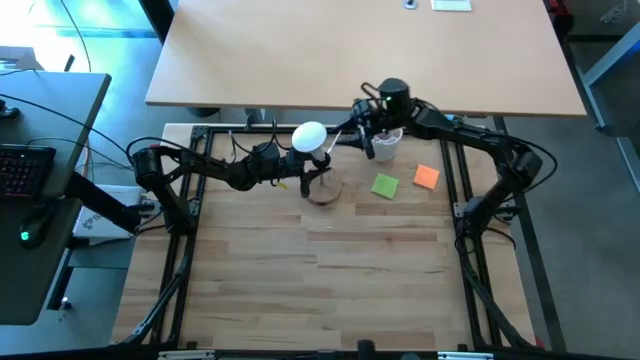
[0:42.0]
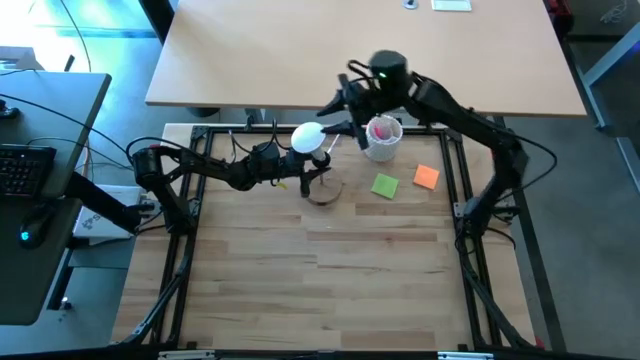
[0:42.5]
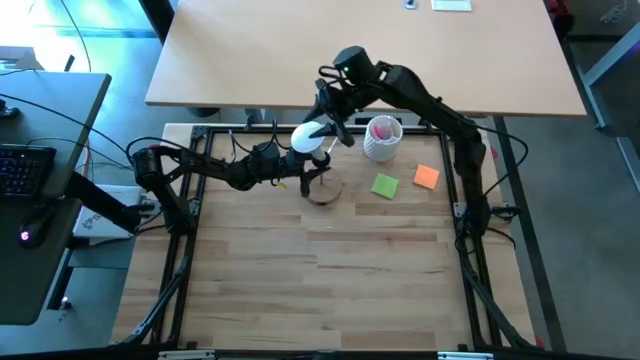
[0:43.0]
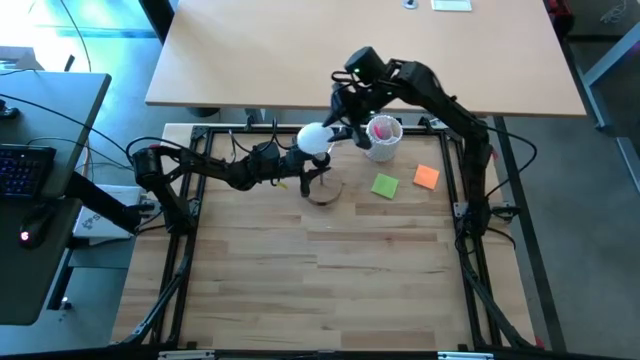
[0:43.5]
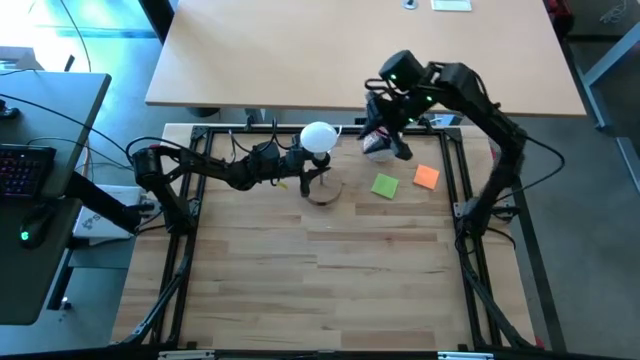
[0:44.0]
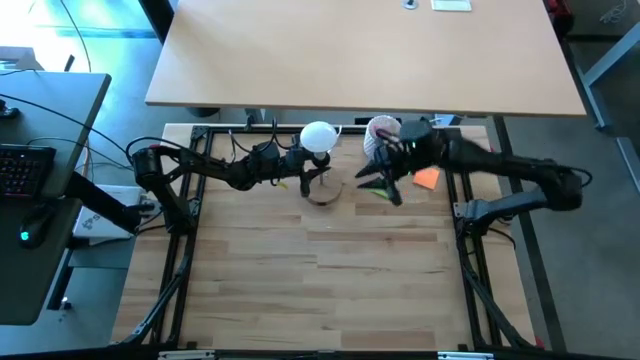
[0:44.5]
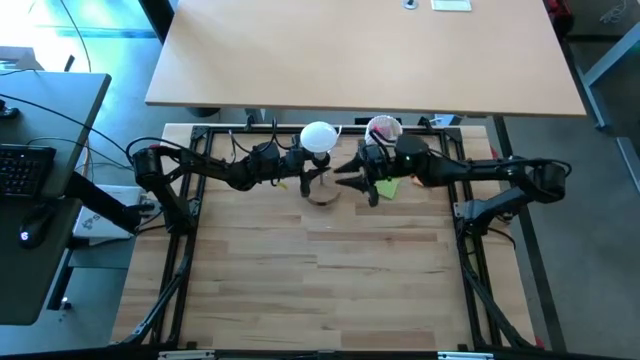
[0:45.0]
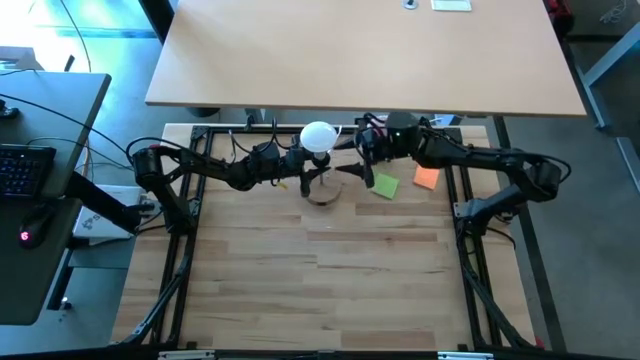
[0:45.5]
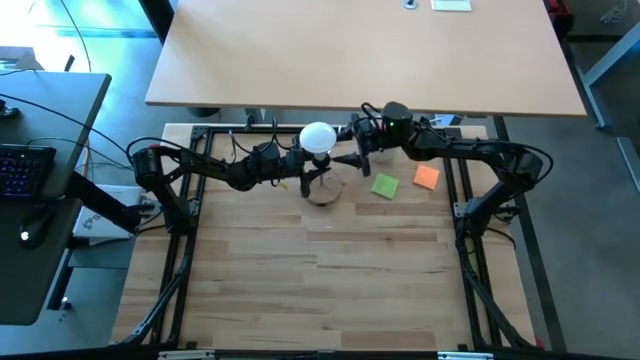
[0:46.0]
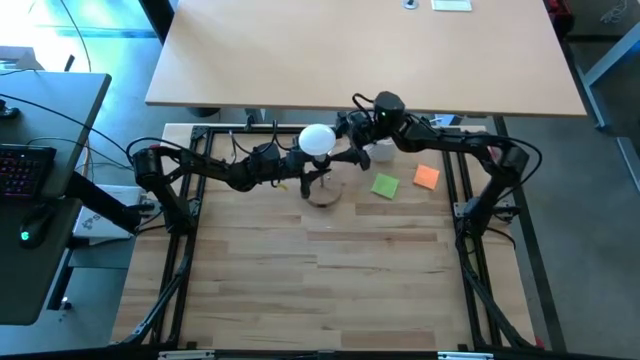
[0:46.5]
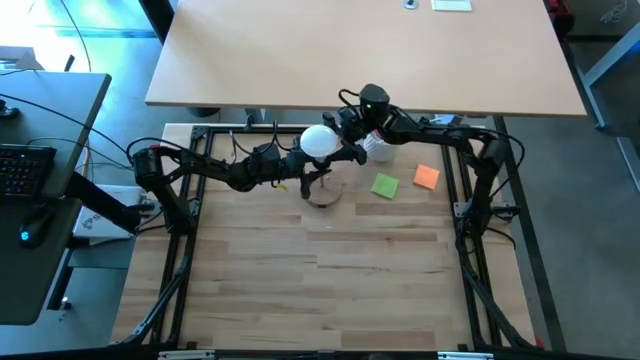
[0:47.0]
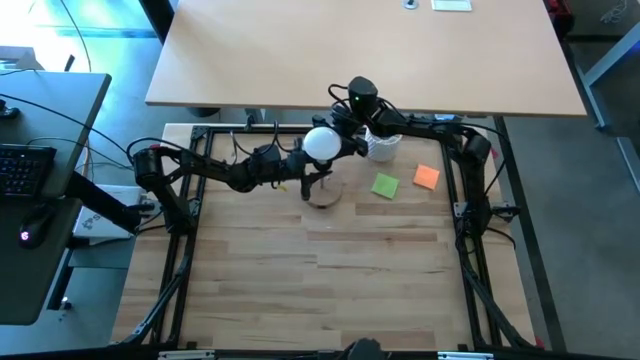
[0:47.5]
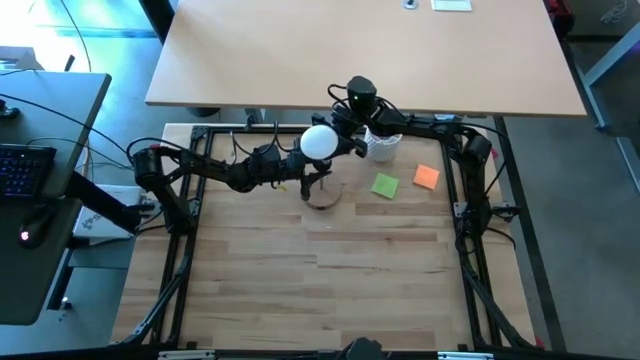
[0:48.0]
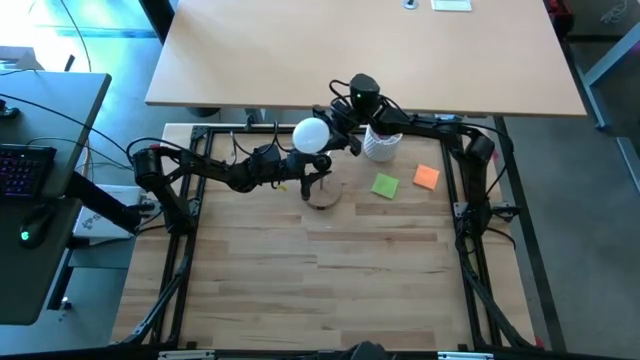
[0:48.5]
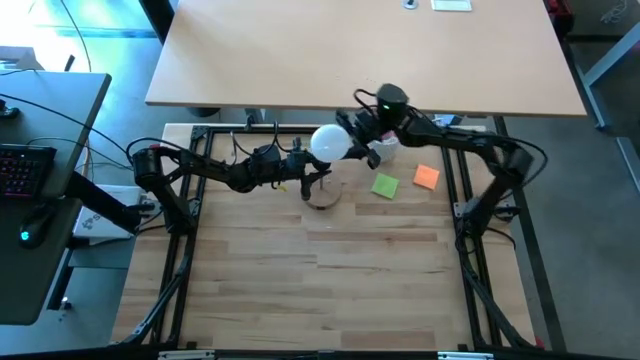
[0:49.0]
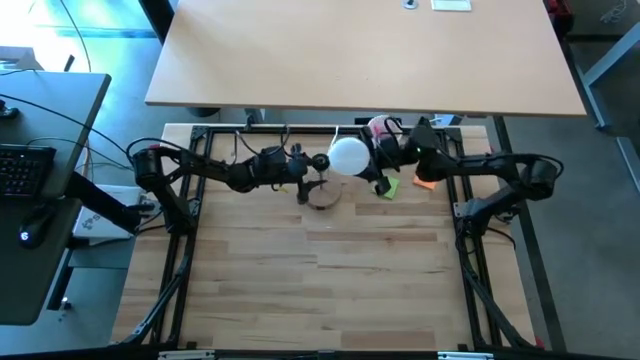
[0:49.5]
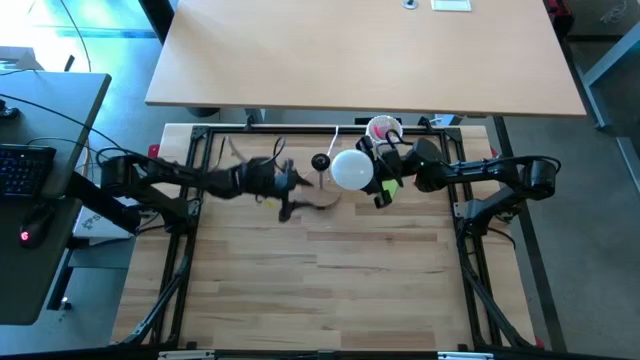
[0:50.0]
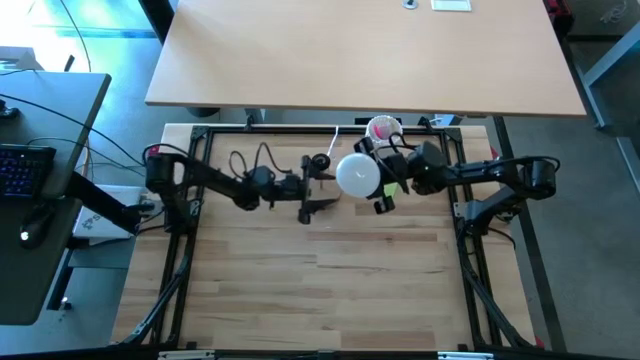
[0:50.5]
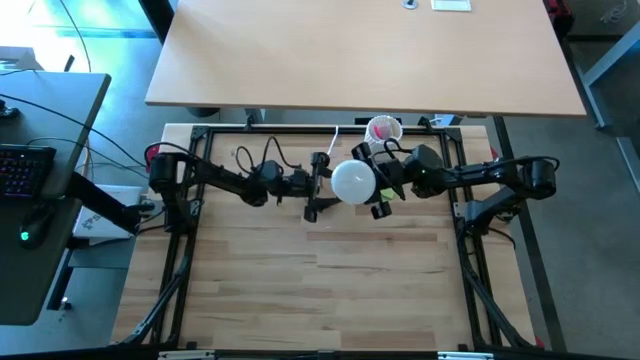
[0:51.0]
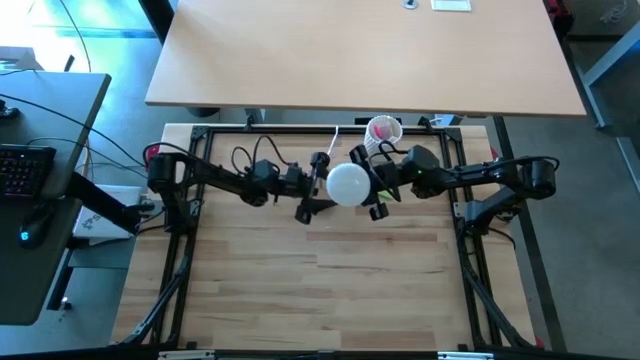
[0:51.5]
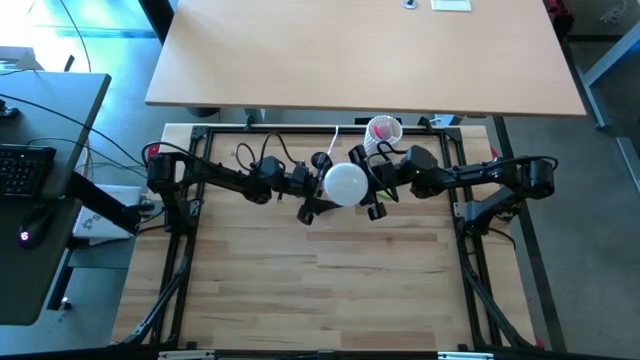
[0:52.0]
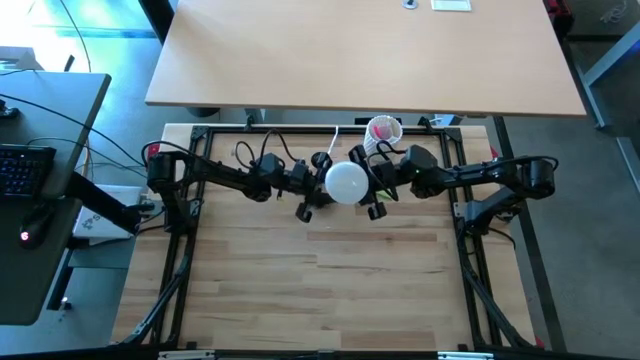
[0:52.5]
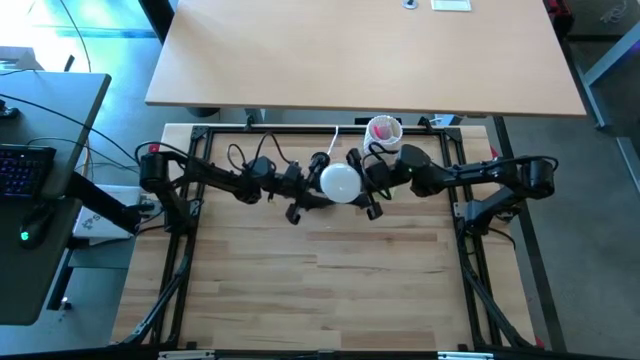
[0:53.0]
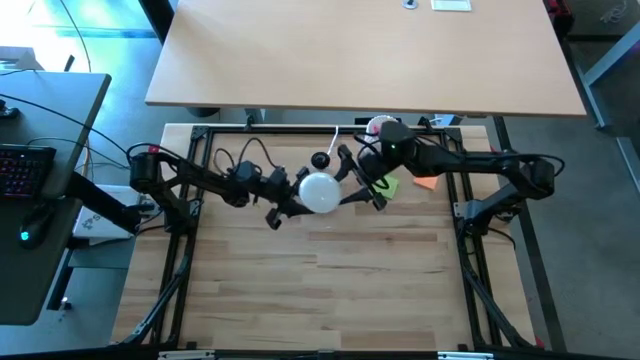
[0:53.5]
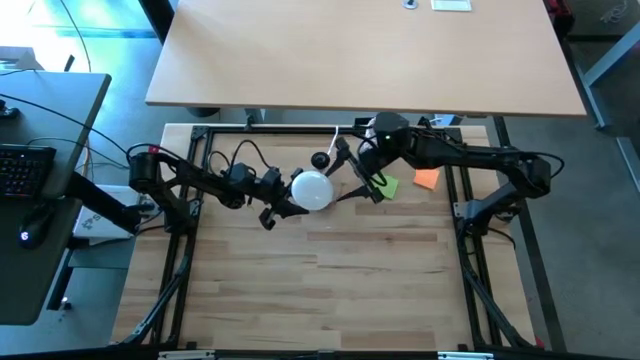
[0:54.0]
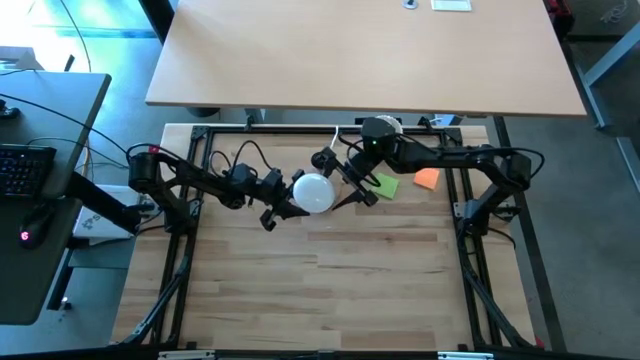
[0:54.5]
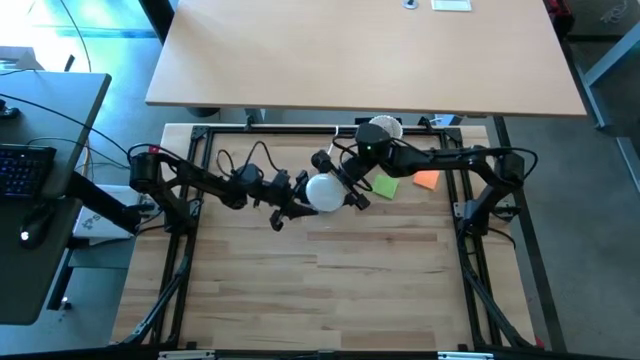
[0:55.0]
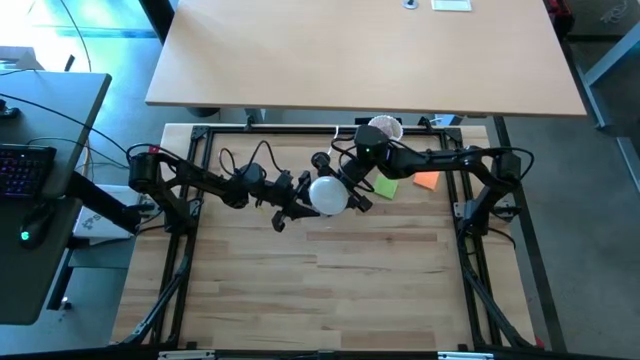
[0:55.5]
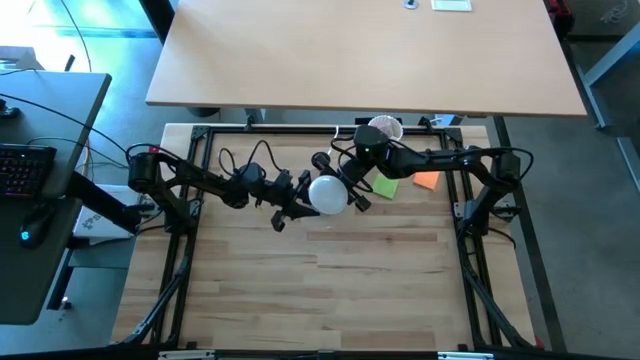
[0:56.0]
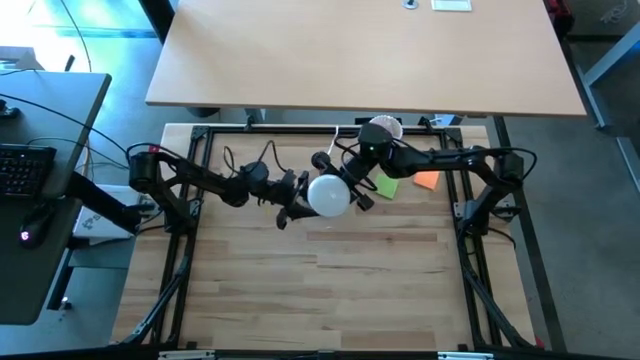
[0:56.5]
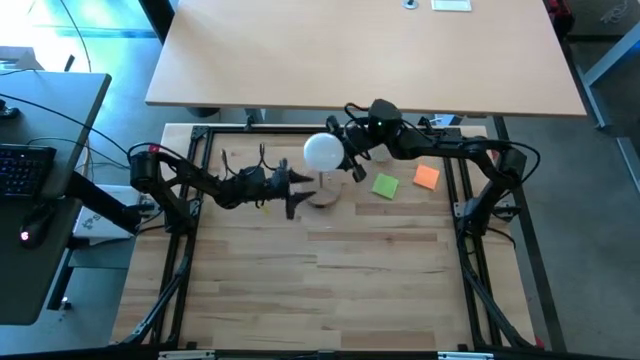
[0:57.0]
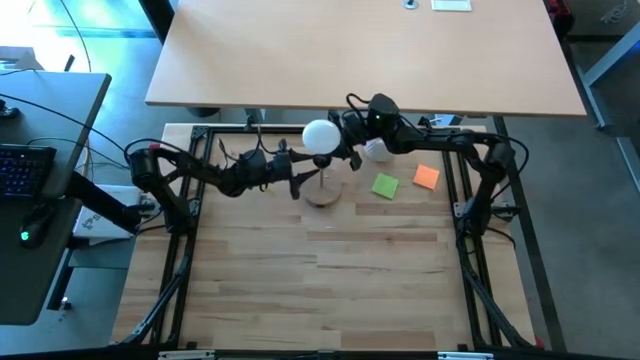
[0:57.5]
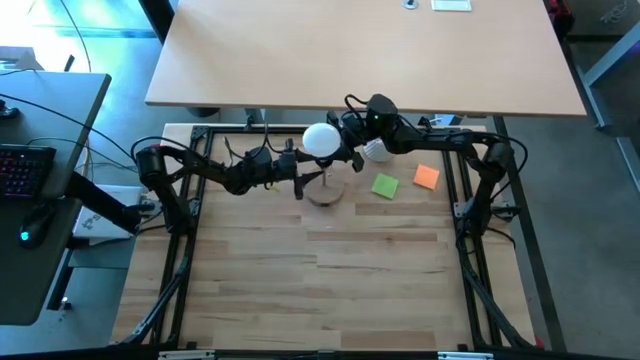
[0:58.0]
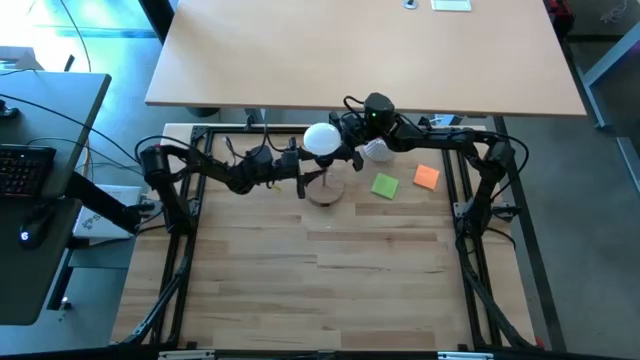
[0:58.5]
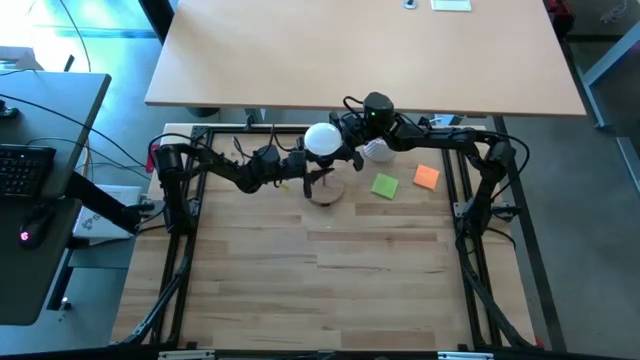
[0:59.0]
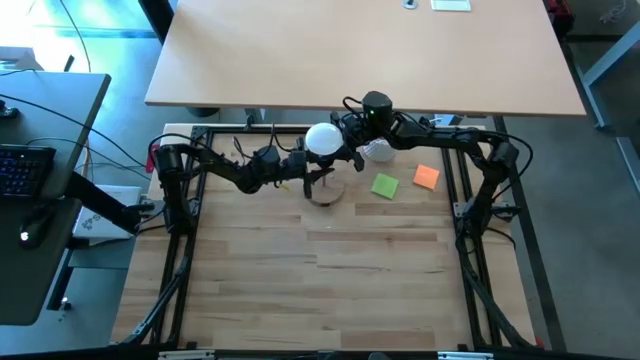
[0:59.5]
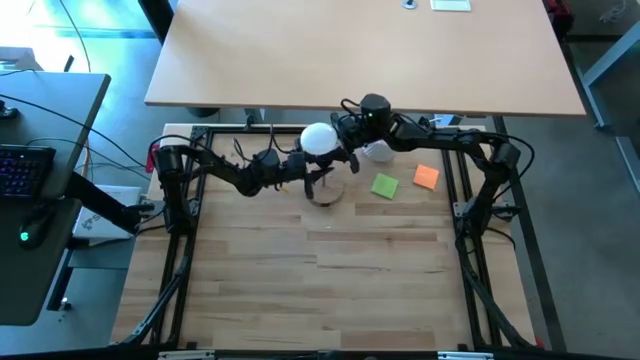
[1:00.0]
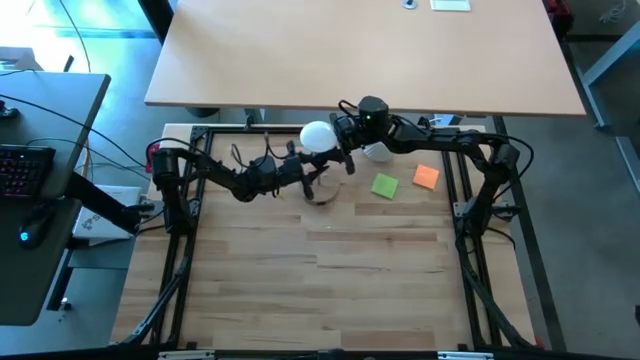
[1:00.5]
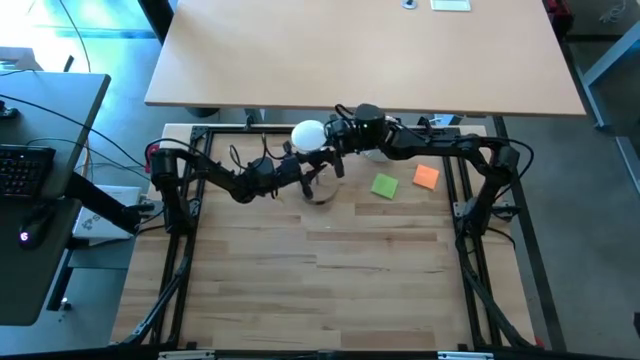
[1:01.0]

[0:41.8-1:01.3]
Task: Screw lightbulb
Insert the lightbulb into the lamp socket

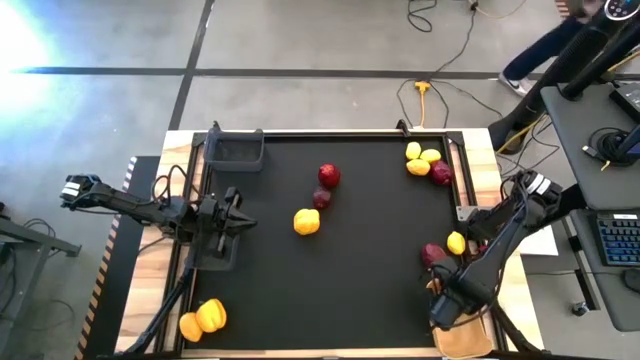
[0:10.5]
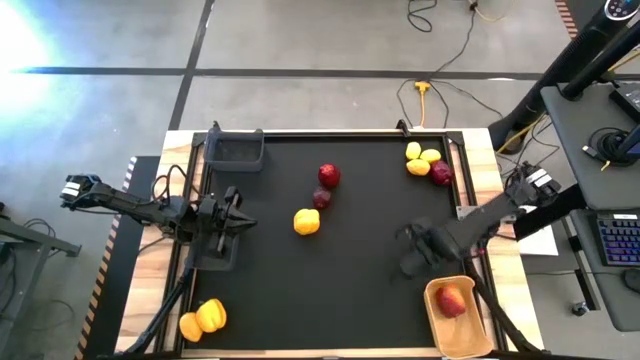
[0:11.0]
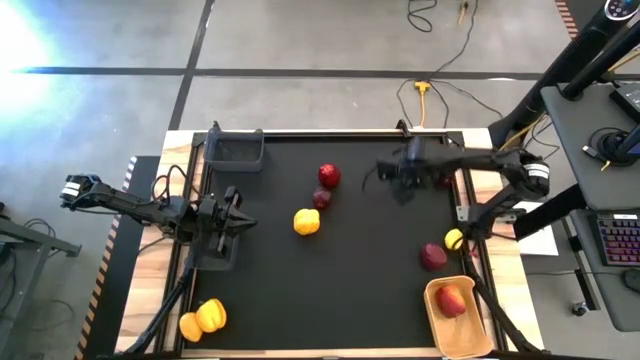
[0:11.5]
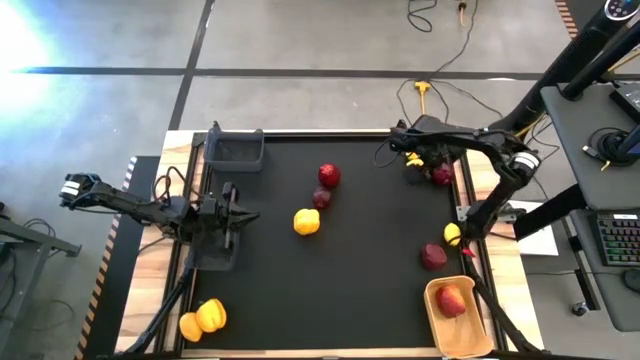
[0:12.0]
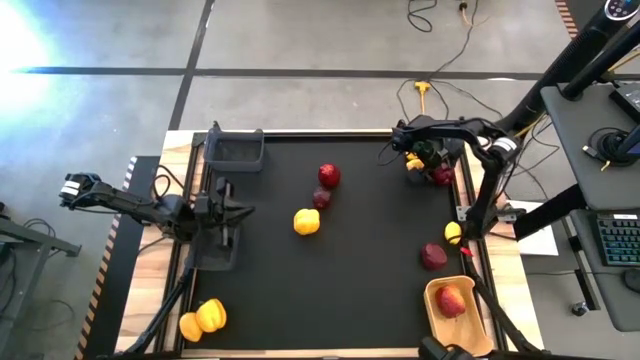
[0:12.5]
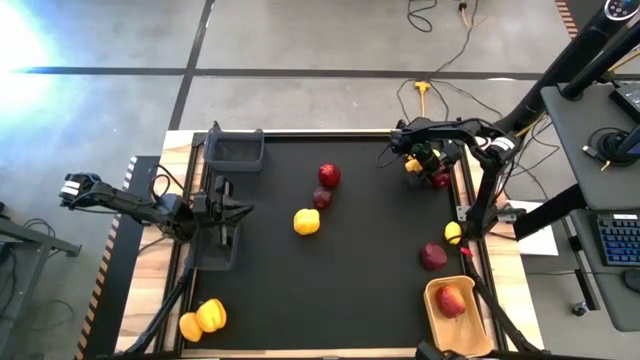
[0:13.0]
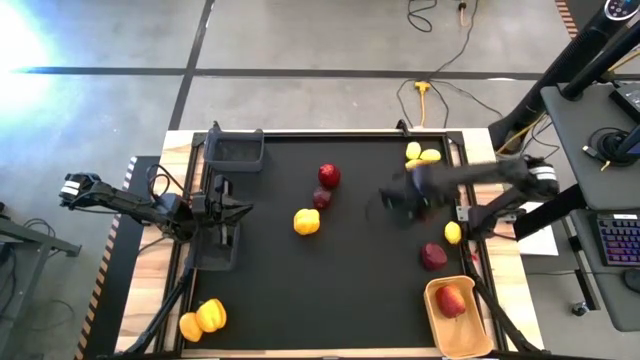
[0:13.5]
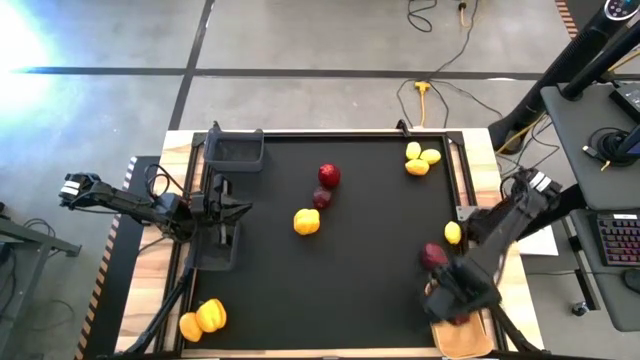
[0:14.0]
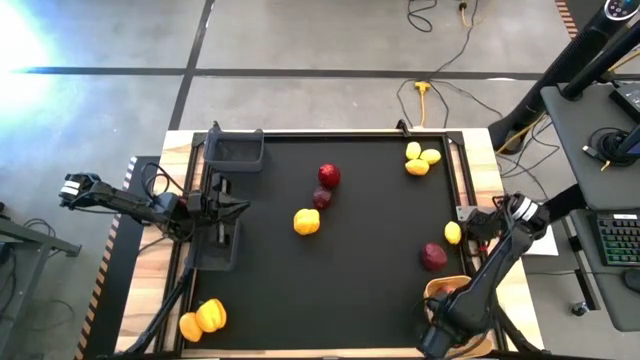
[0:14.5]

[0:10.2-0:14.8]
Task: Sort produce into baskets
Put the apple into the yellow bin
